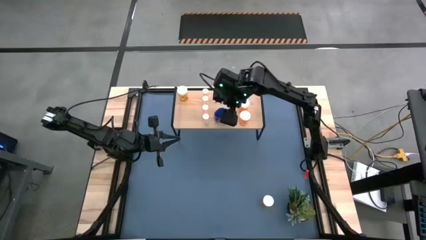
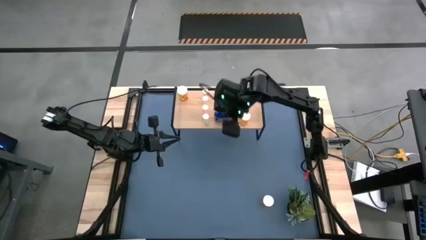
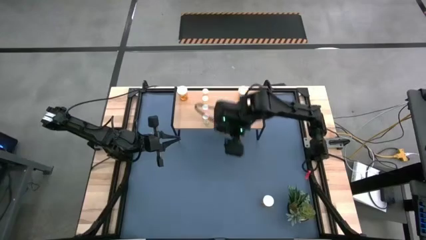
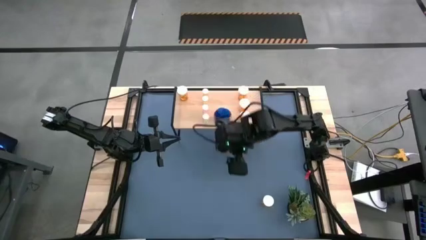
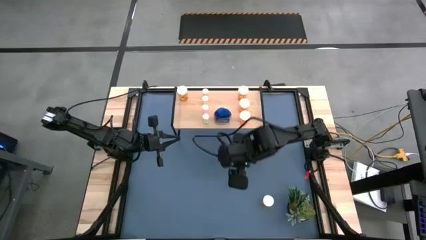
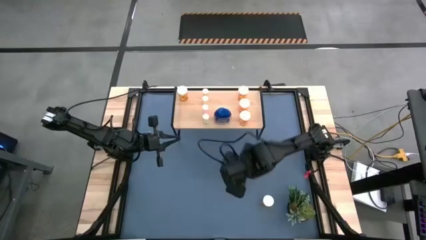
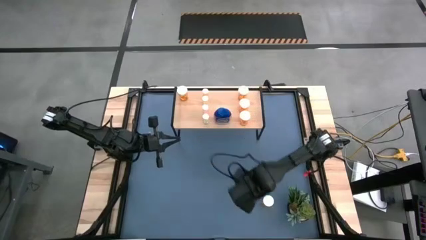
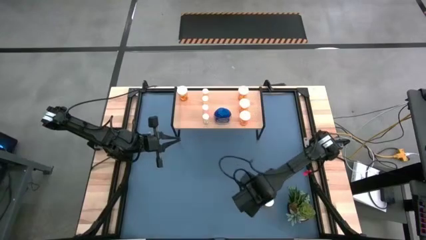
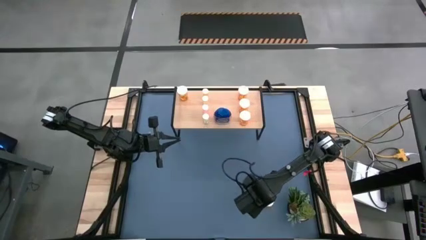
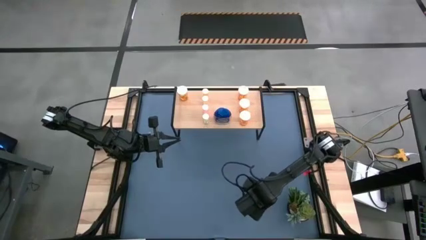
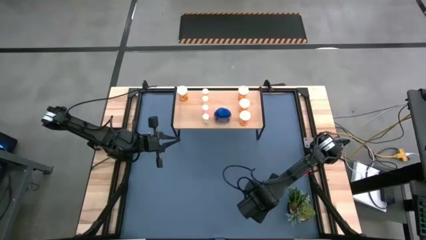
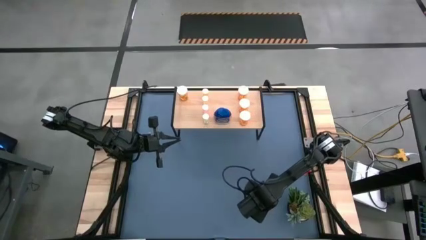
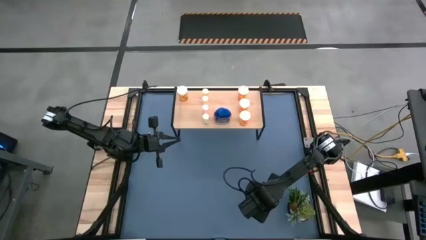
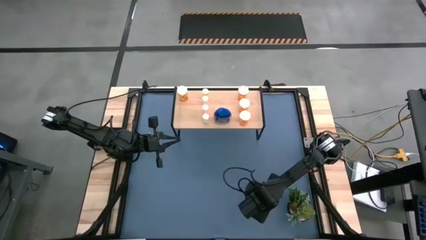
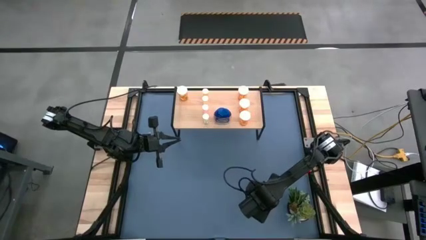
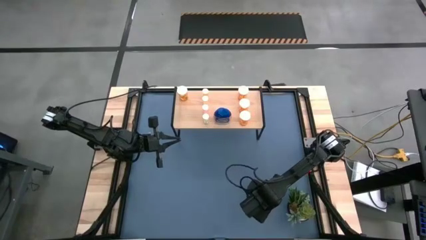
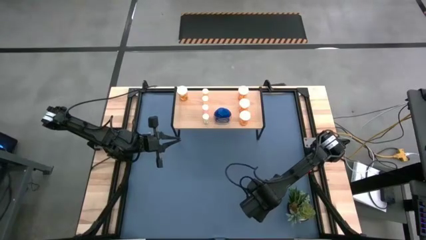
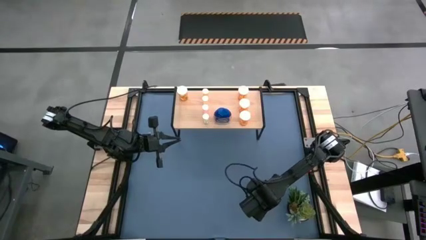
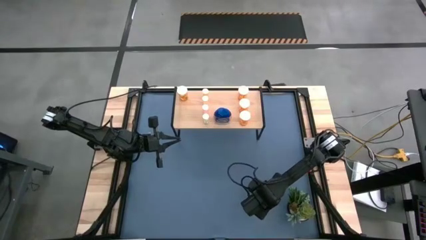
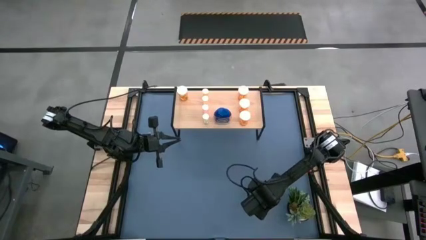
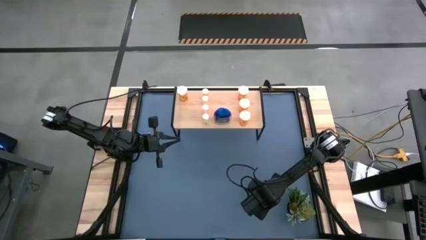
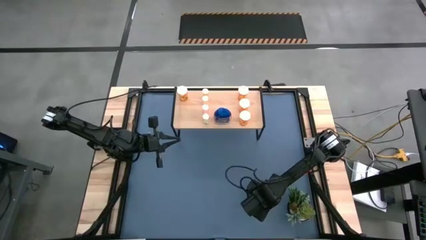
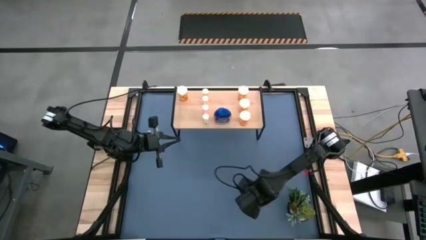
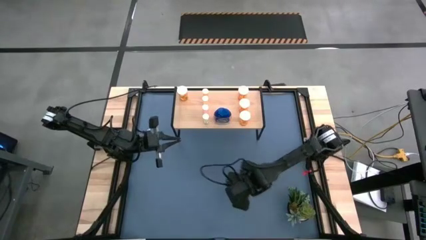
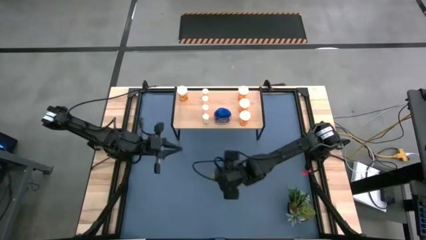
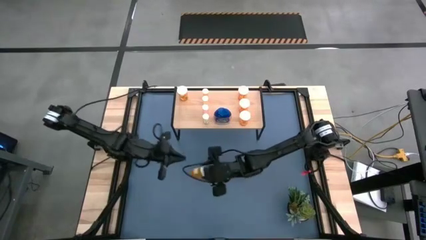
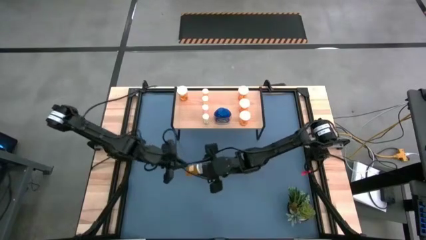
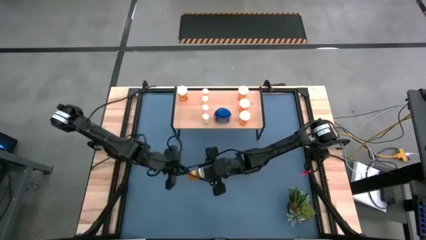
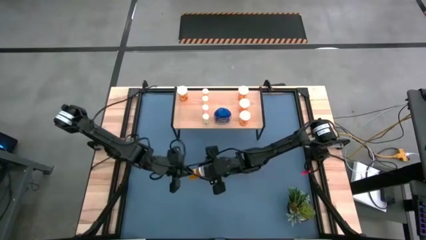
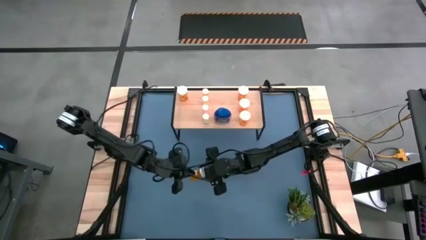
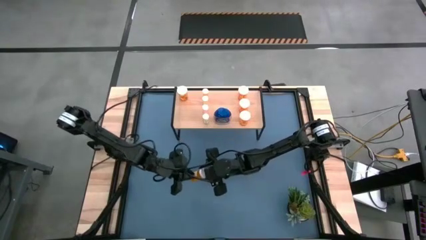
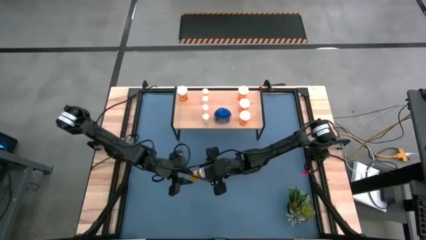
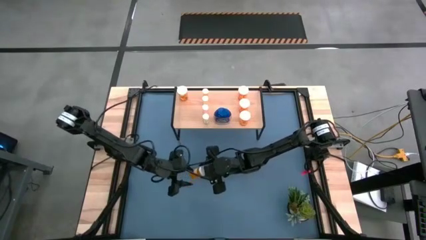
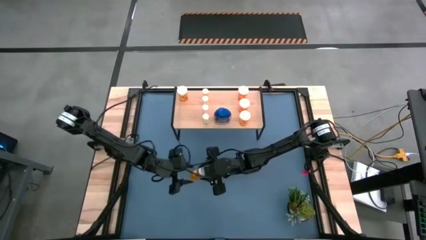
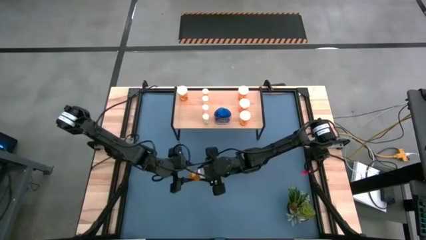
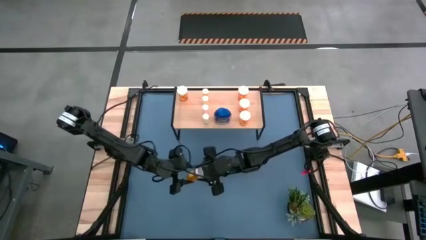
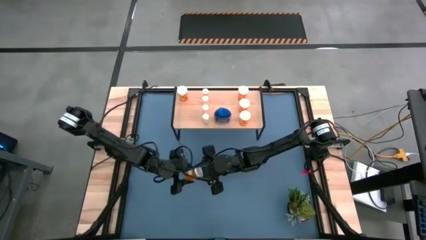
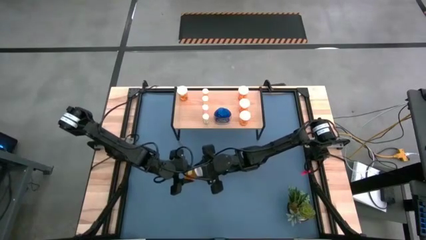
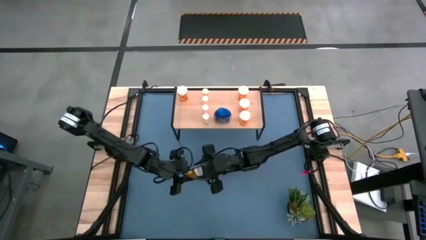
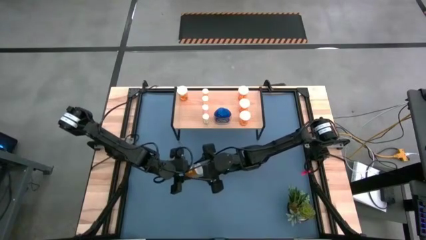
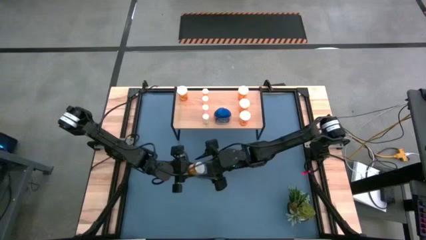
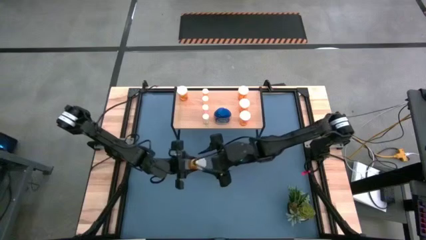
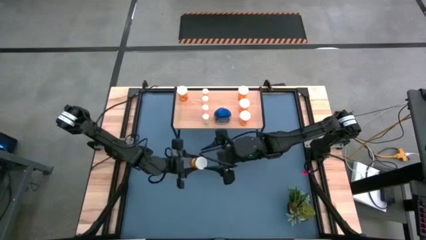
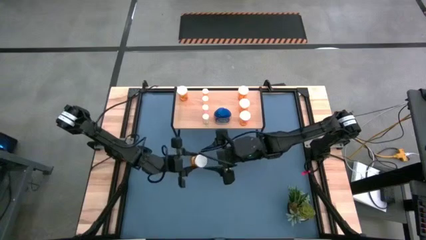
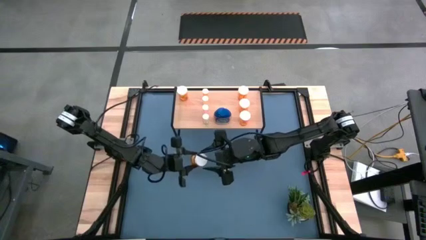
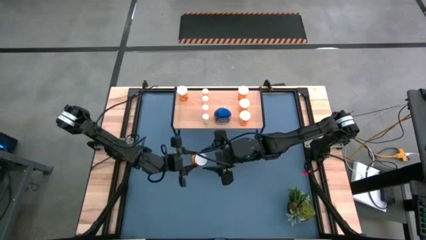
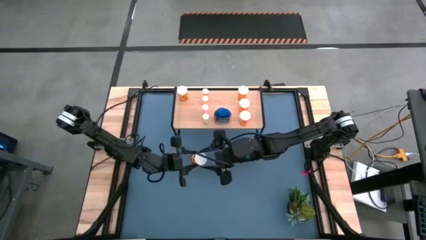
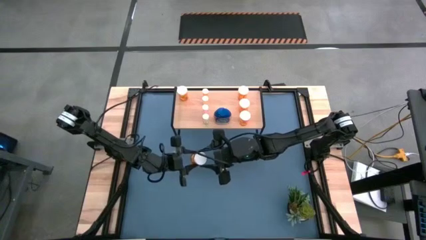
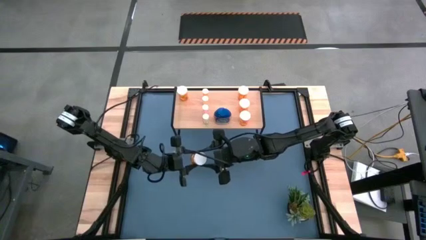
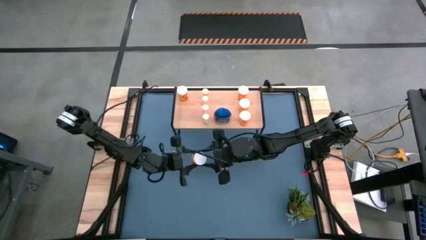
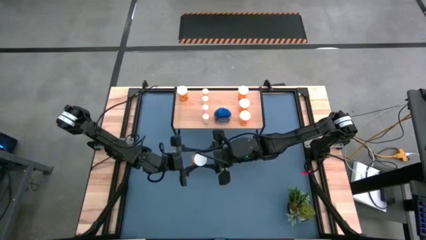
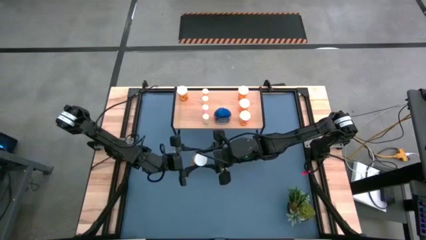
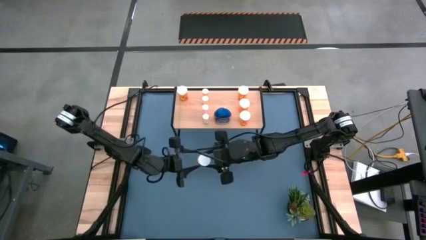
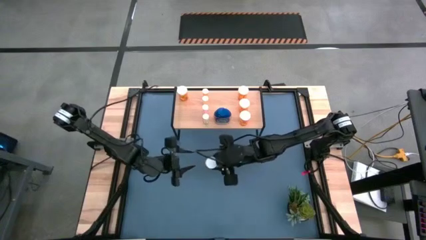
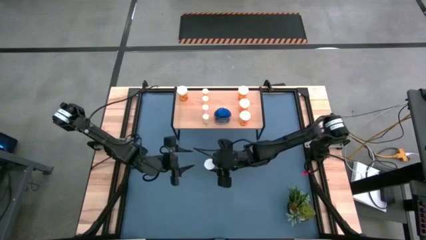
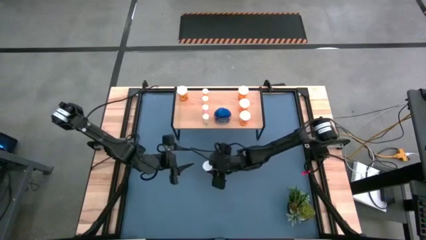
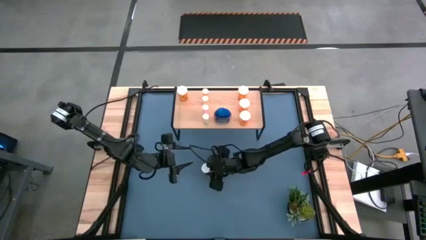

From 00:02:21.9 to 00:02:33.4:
Task: Pick and place medicine bottles onto shelf by color
Align the large orange pill bottle with the other large orange pill bottle on the shelf

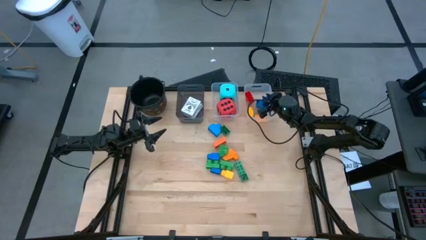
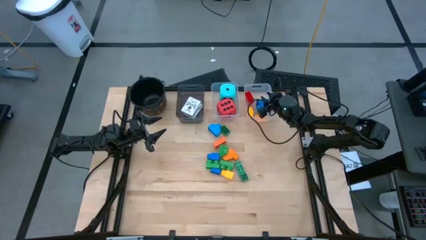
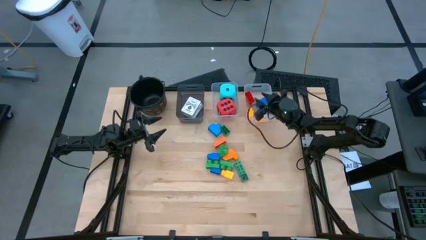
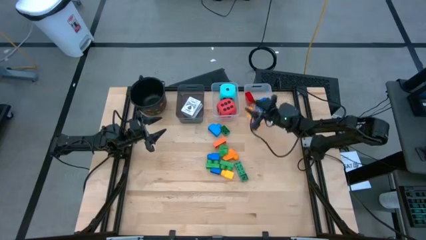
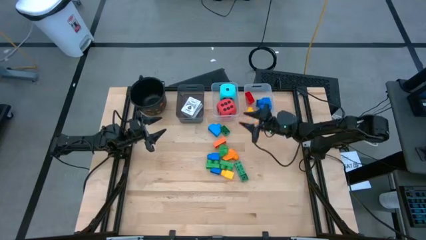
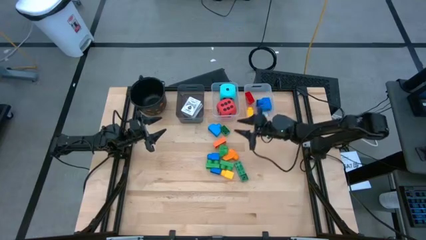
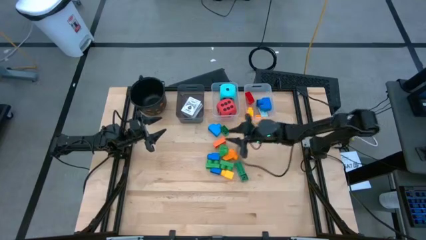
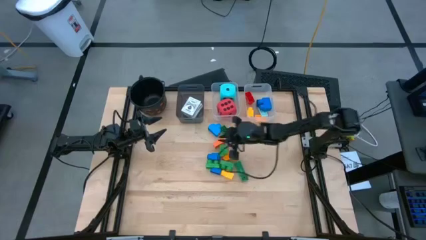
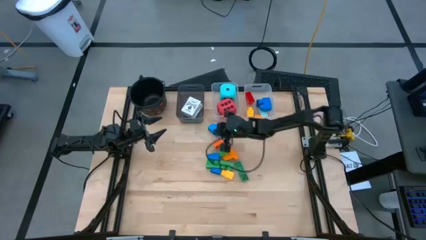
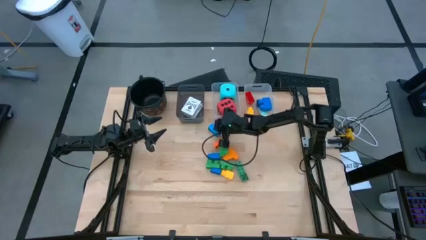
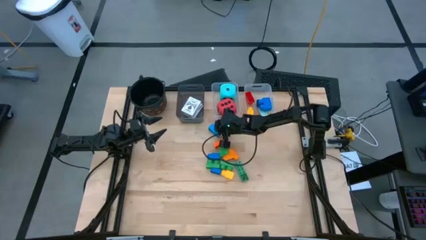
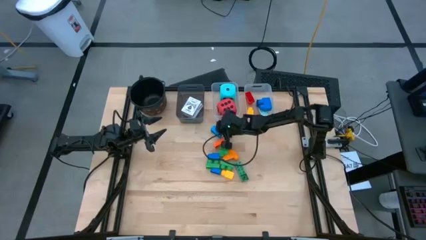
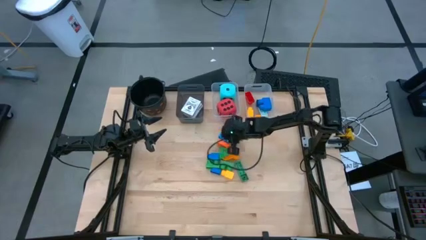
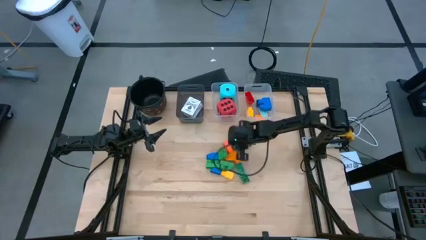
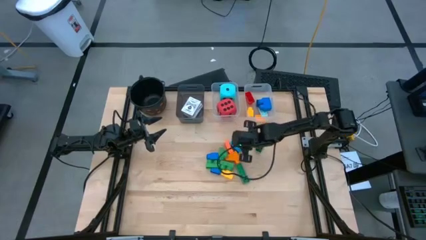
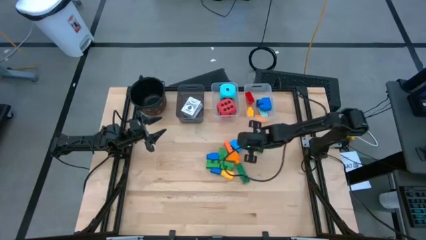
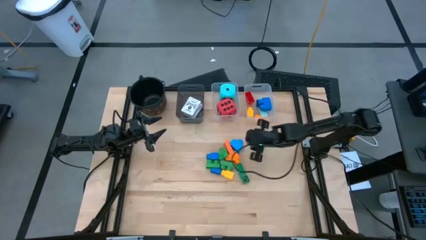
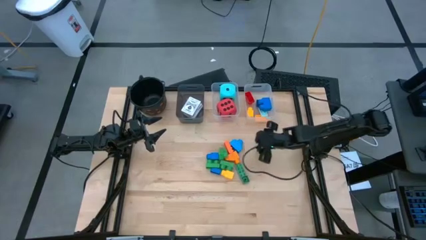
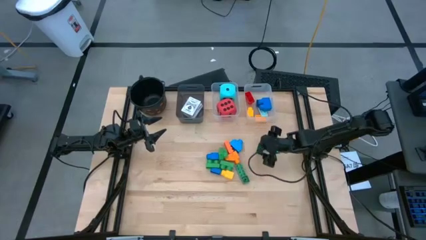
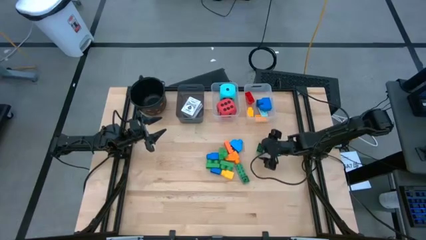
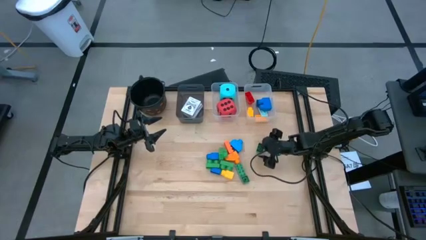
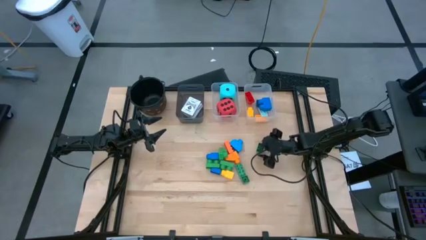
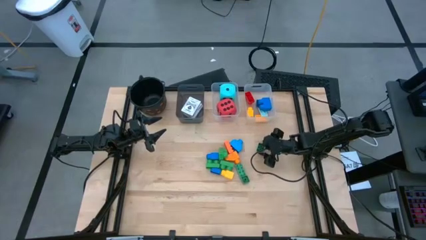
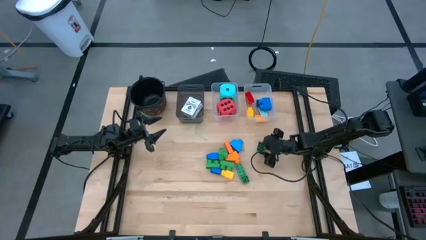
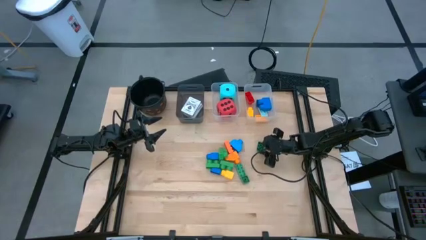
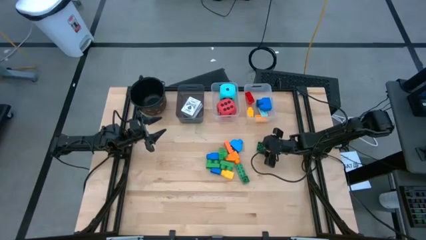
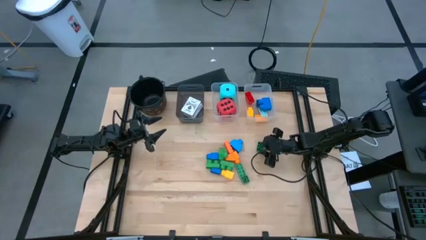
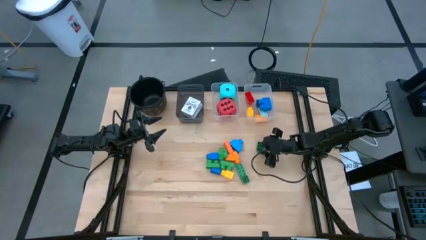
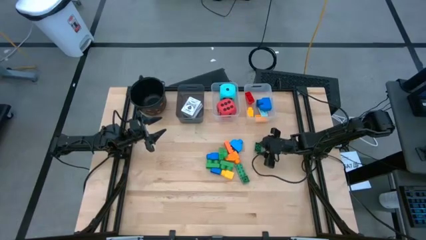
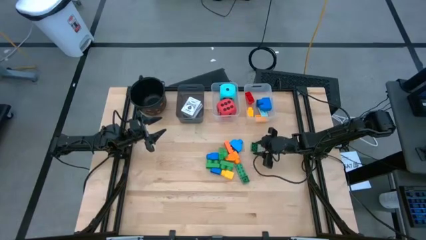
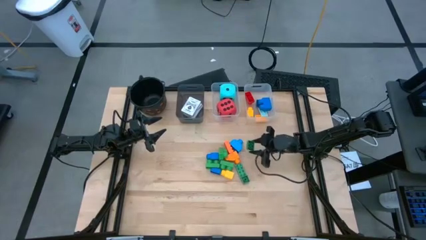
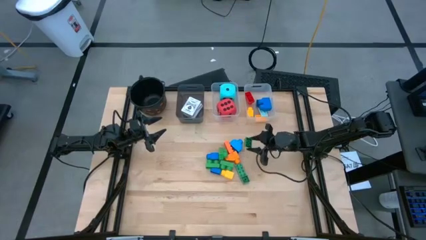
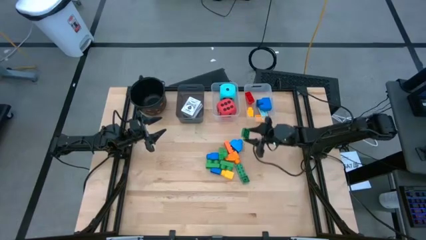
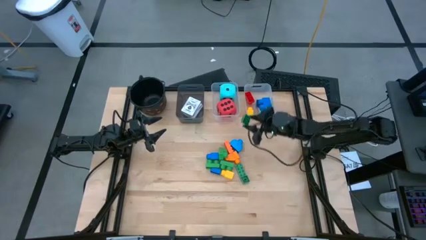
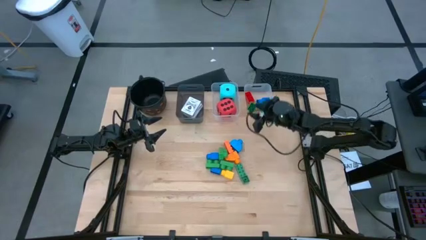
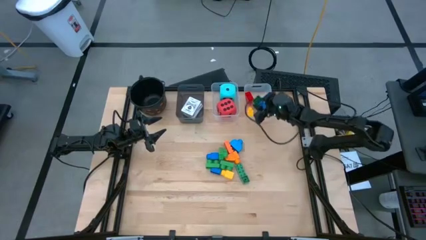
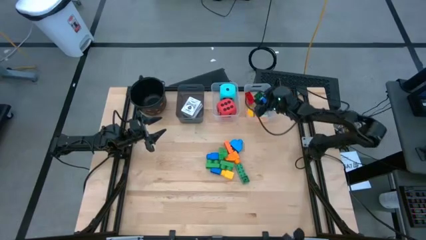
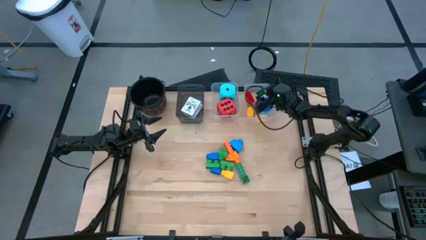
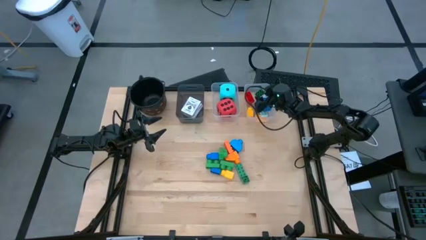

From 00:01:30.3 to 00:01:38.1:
Task: Pick & Place Toys
Put the green block into the right transparent bin
